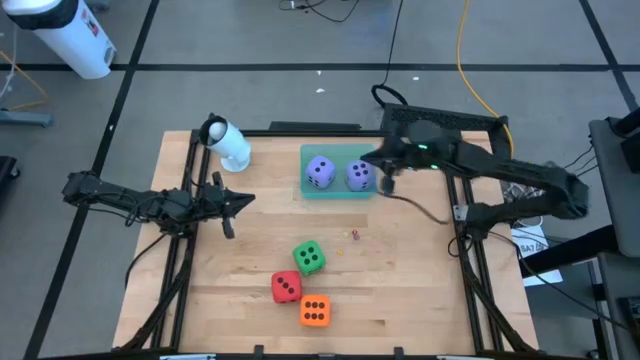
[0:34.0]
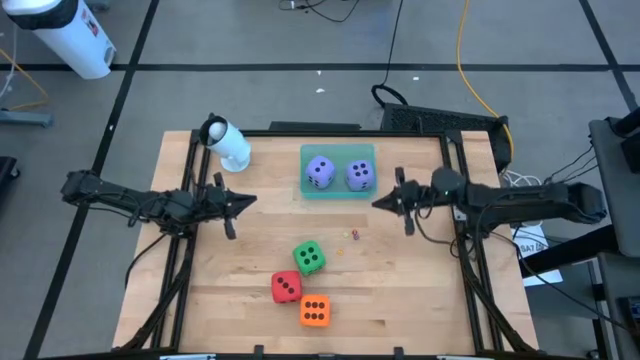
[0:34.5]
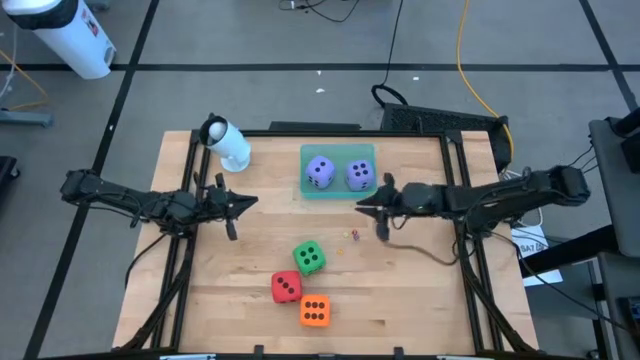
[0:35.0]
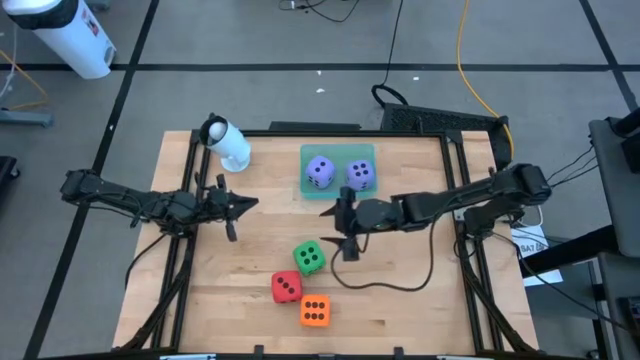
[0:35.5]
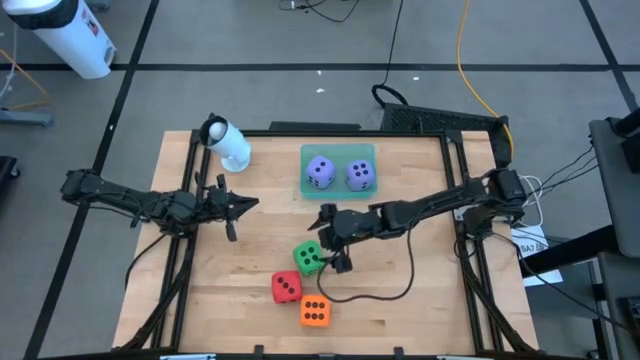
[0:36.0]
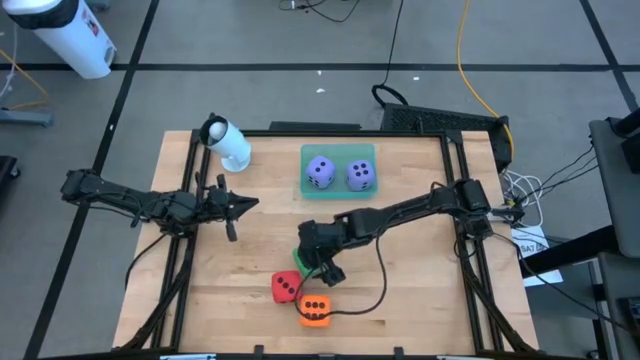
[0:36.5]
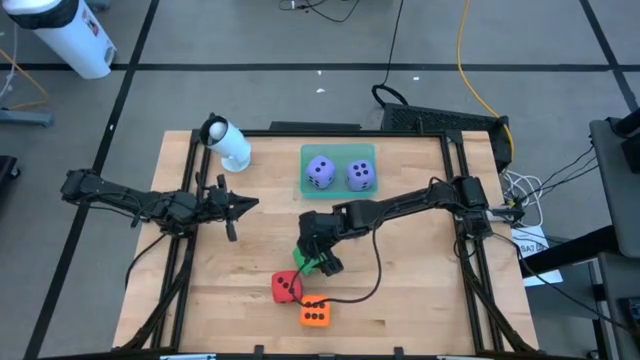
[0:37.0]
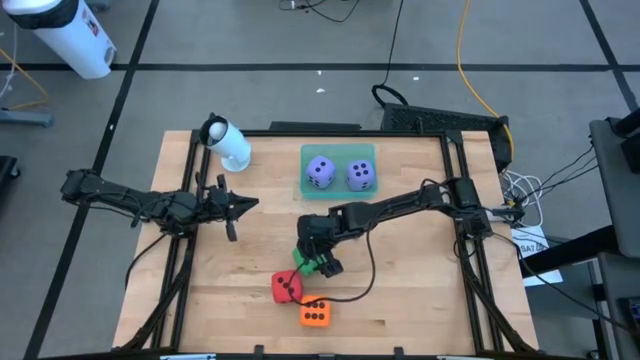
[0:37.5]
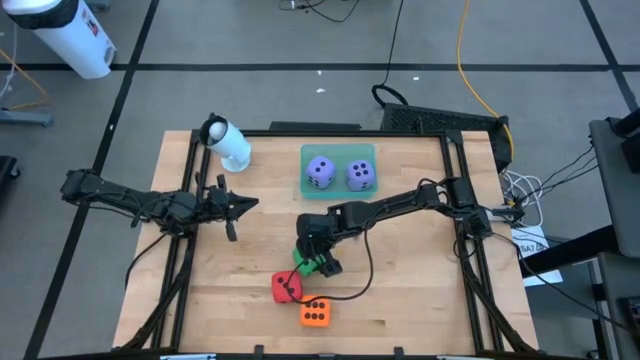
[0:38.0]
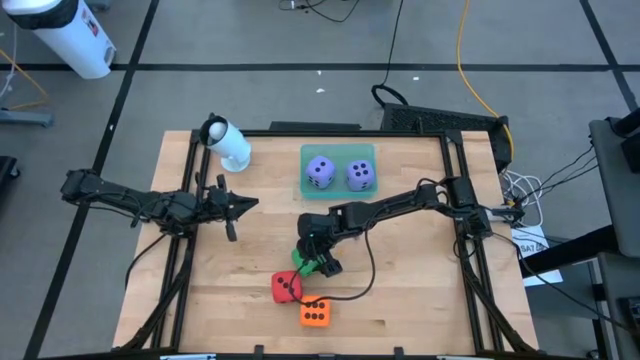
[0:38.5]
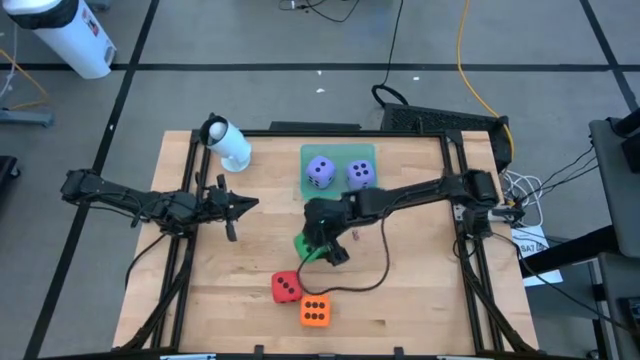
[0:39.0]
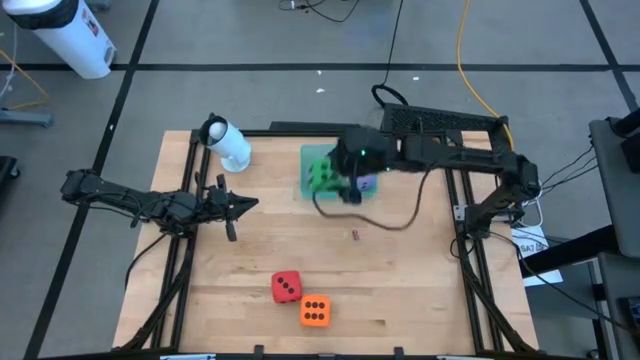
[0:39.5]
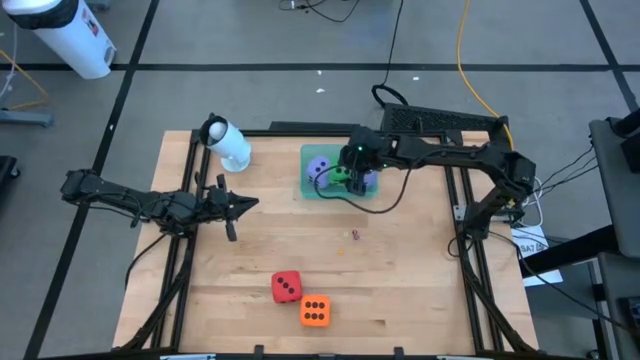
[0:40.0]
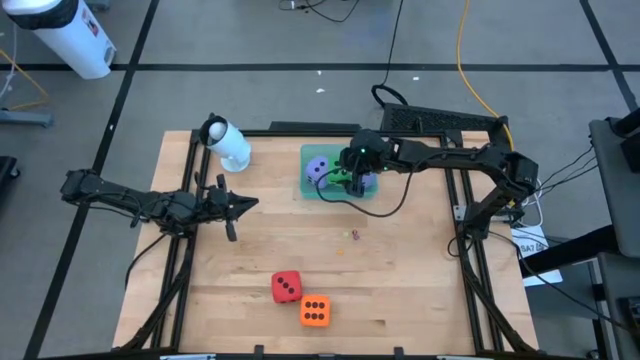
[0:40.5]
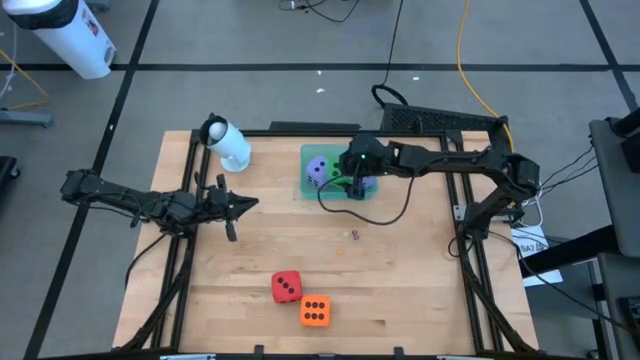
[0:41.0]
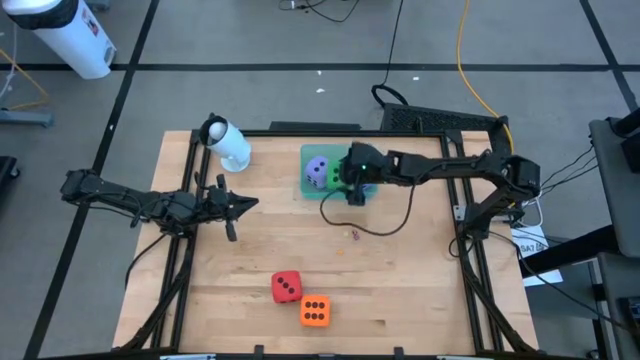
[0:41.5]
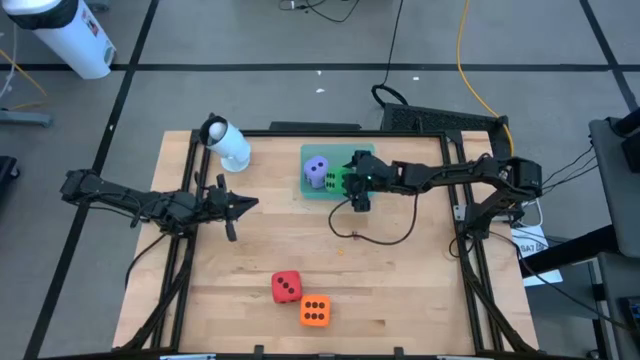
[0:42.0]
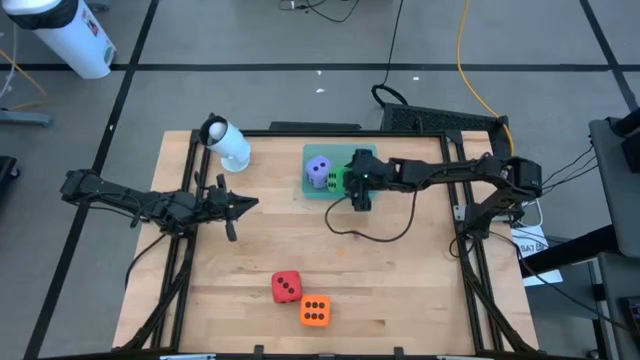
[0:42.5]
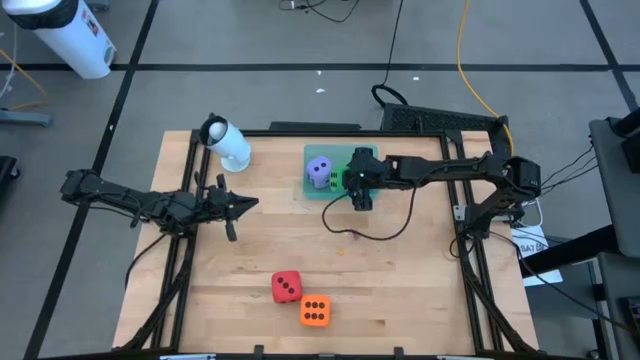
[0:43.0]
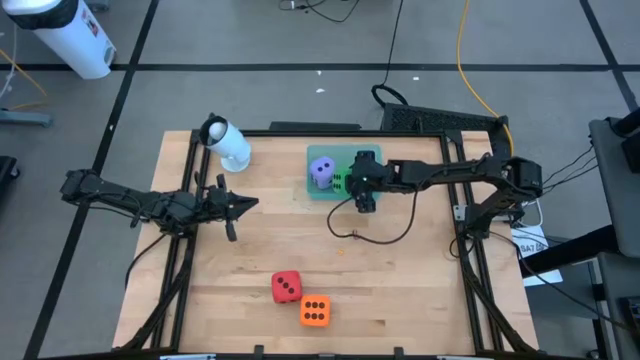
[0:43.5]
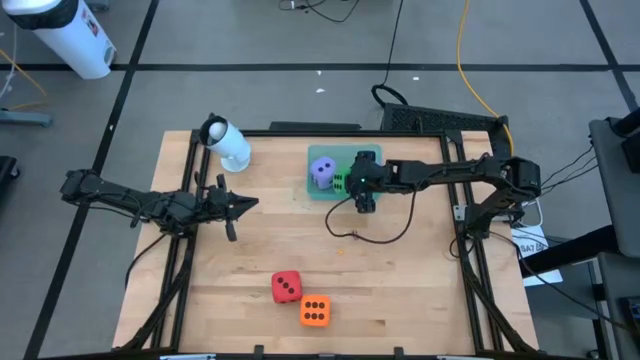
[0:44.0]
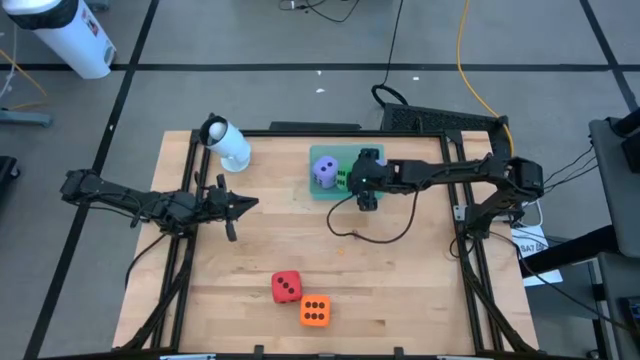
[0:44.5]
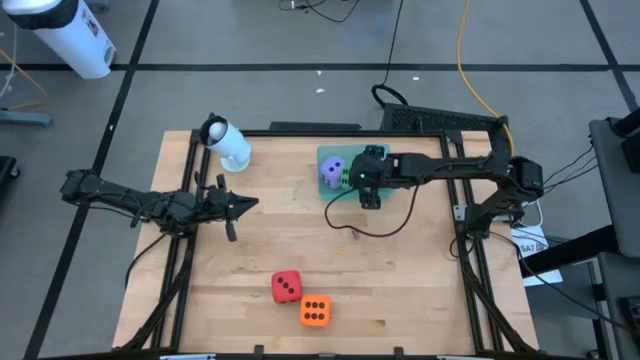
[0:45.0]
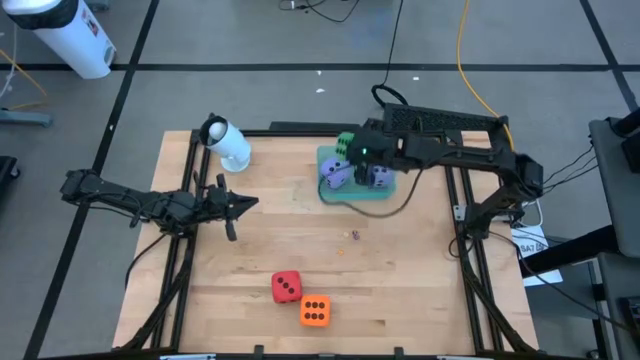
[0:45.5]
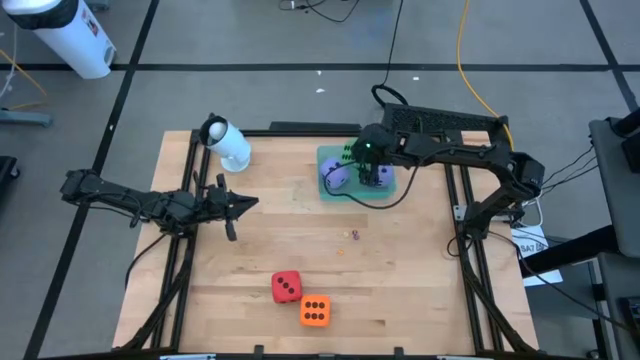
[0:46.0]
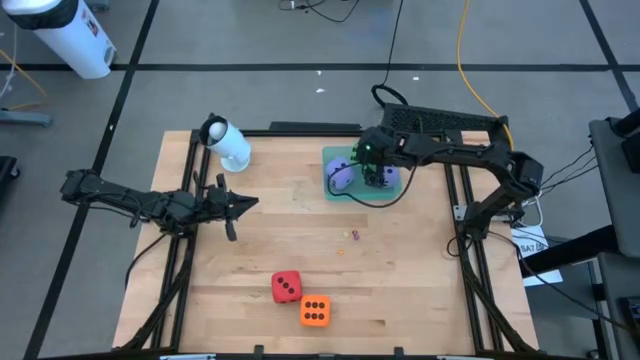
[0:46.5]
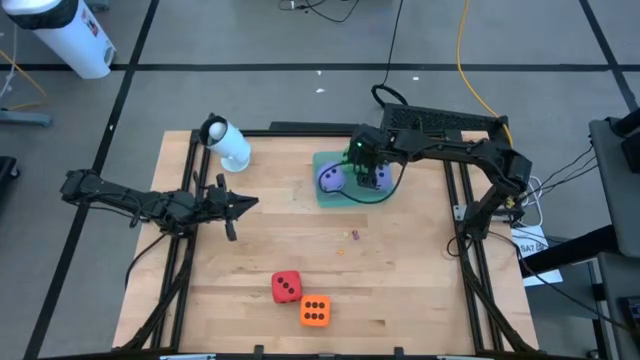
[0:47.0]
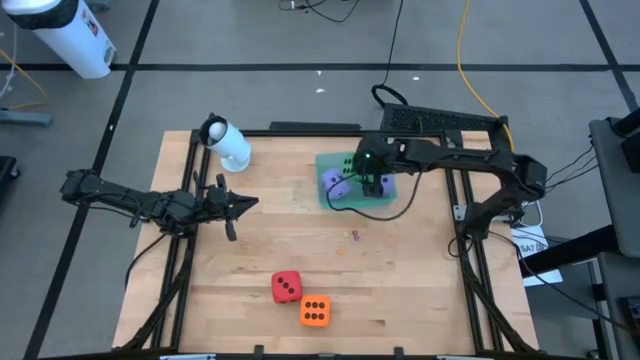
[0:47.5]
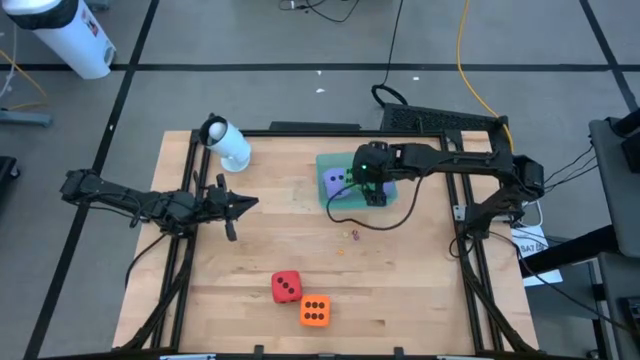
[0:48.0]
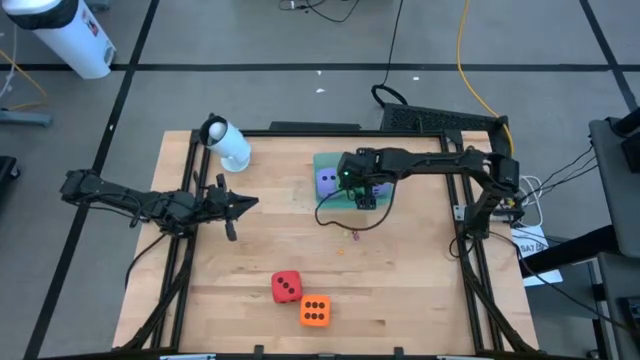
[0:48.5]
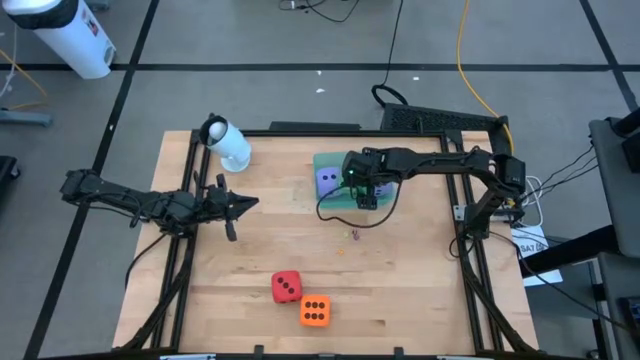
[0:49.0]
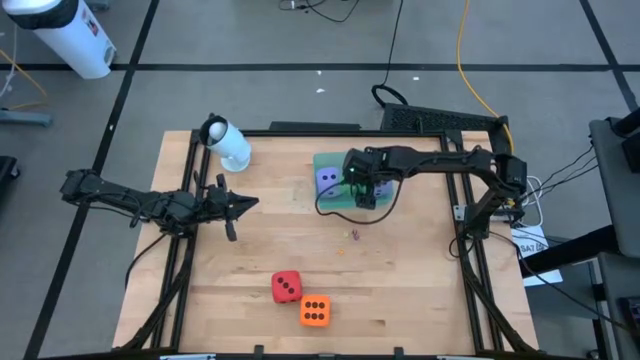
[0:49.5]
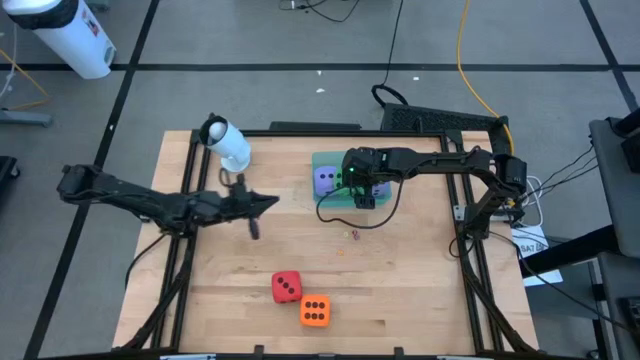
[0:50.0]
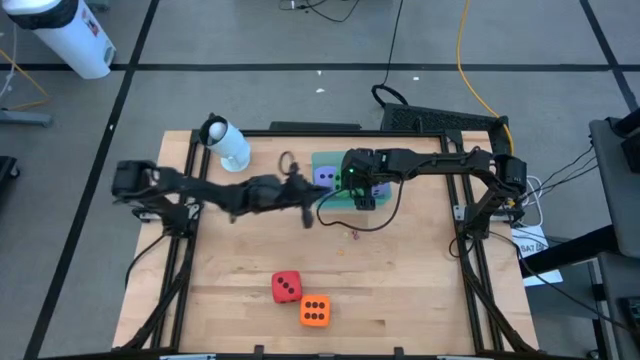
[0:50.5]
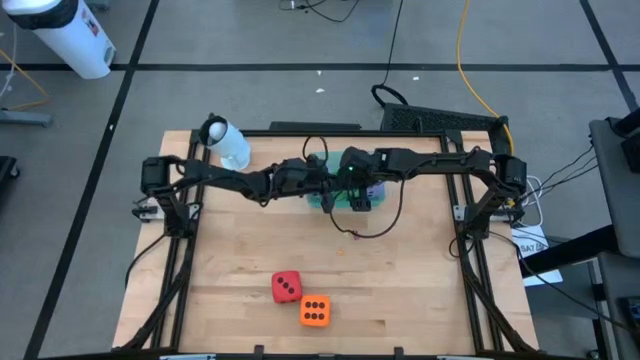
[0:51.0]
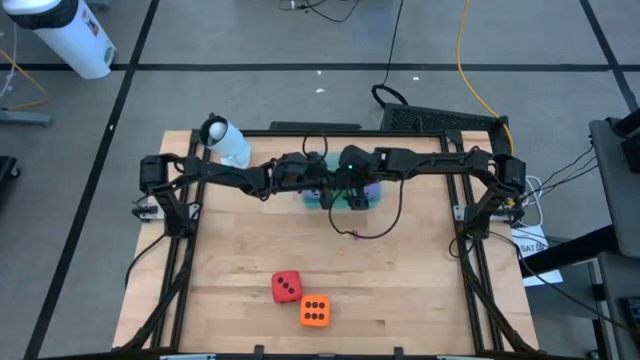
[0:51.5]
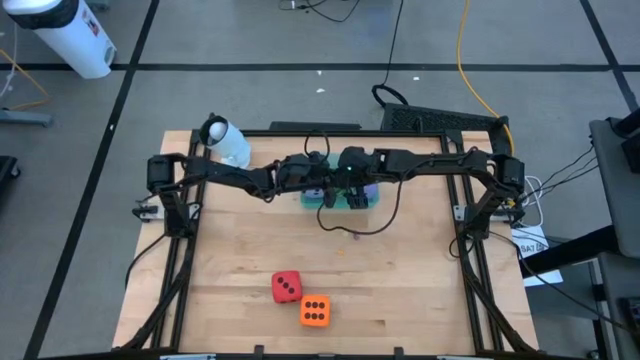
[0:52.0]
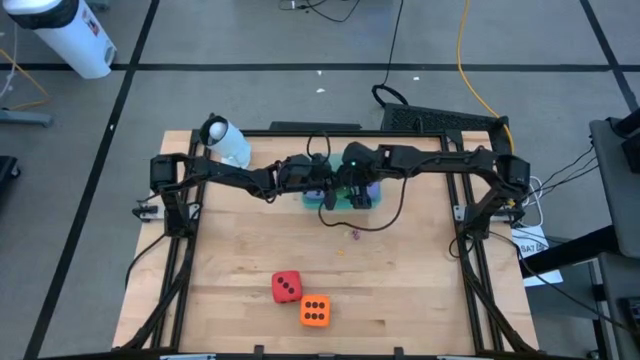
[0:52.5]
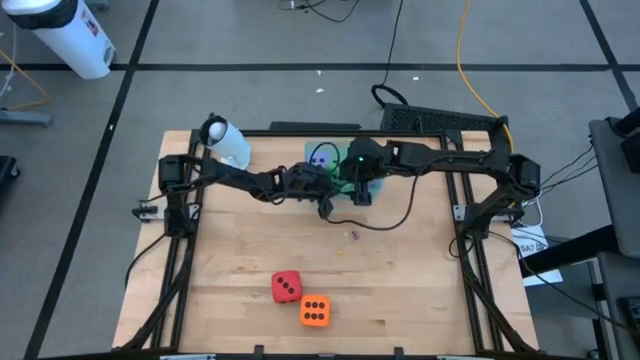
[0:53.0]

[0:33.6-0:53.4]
Task: Pick & Place Dice
Put the big green dice into the green bin

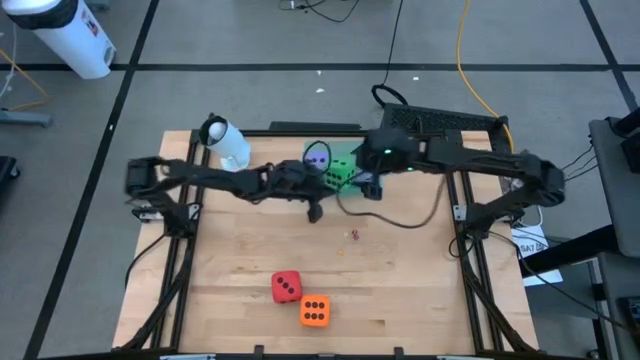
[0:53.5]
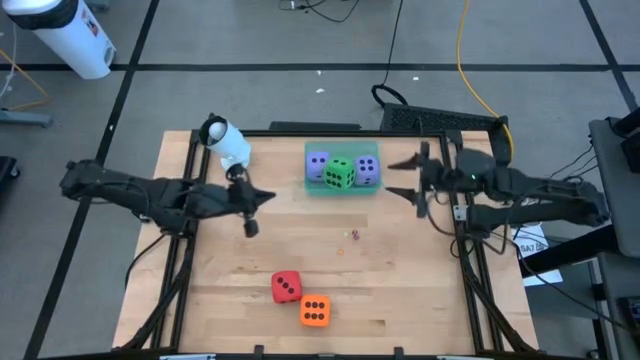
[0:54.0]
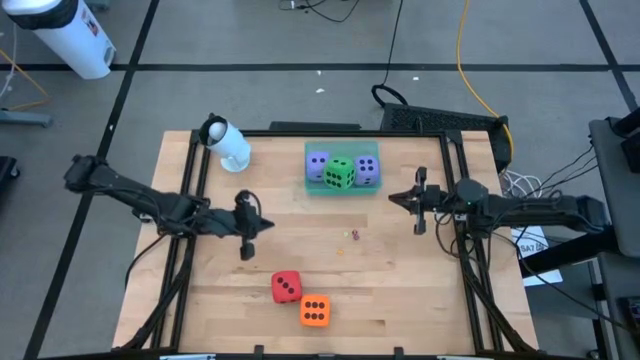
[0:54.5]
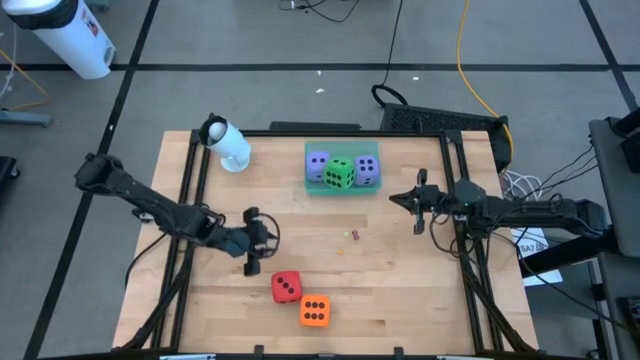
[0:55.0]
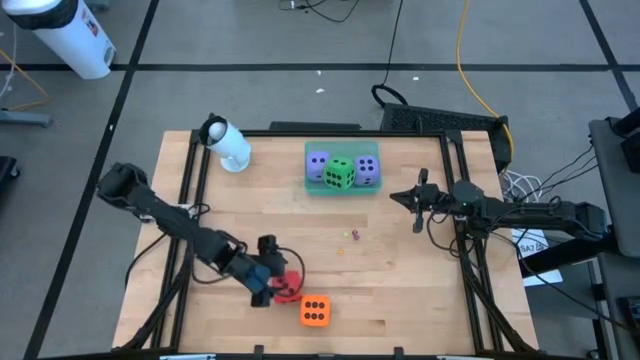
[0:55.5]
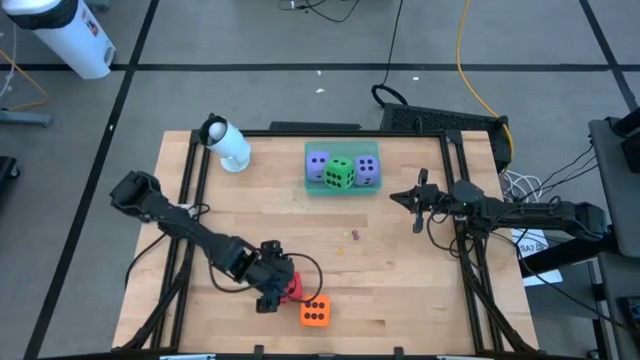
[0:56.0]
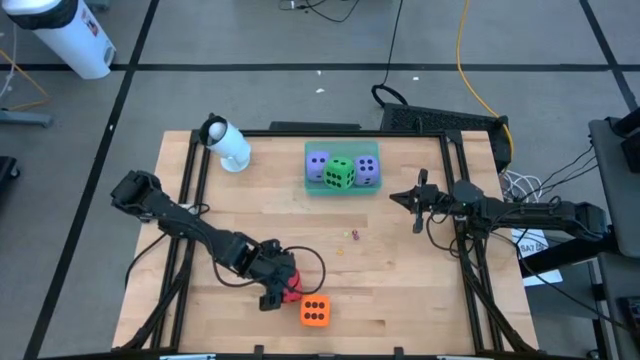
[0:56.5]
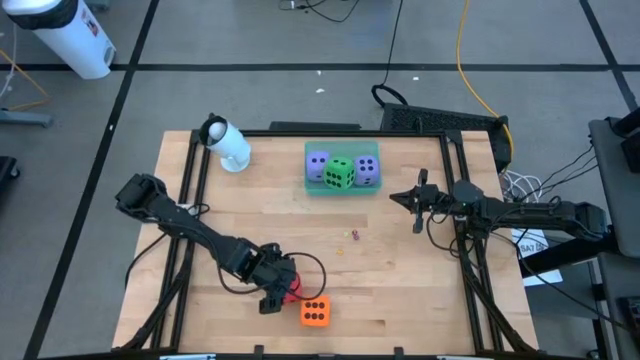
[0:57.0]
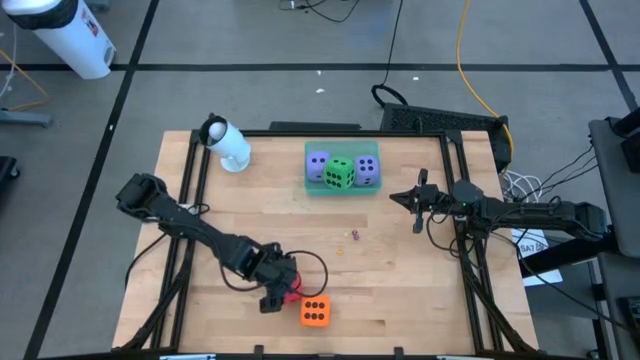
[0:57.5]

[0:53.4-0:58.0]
Put the big red dice into the green bin
